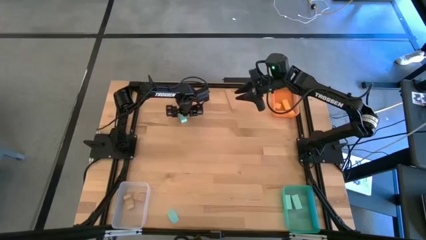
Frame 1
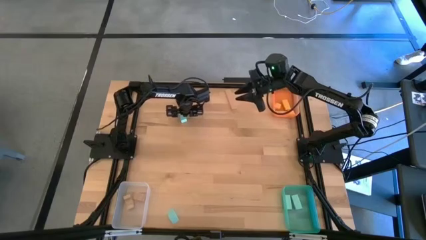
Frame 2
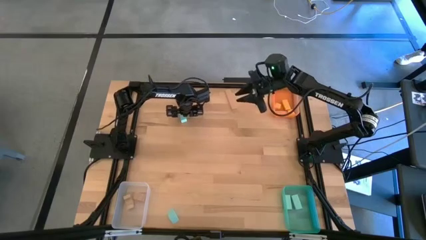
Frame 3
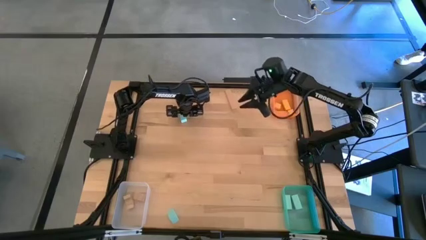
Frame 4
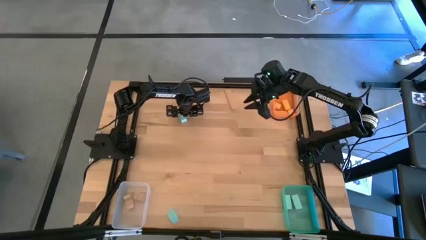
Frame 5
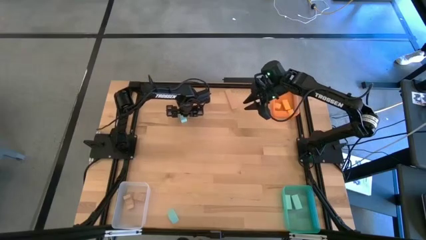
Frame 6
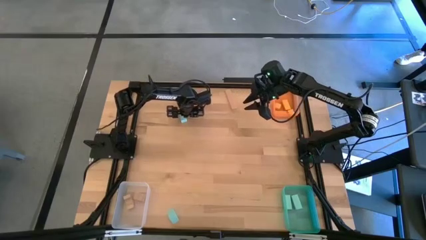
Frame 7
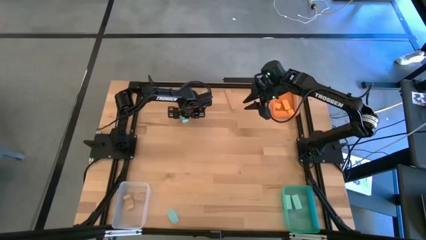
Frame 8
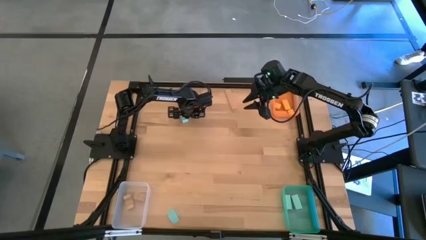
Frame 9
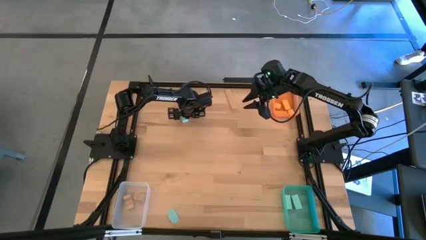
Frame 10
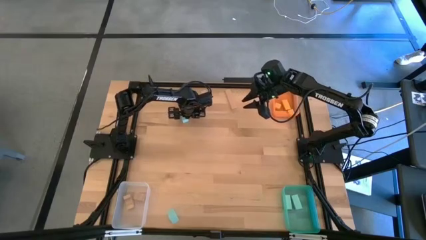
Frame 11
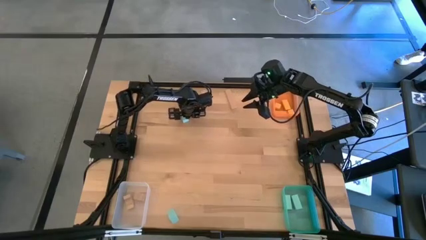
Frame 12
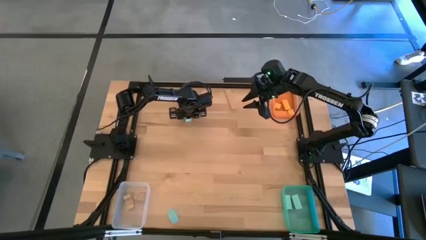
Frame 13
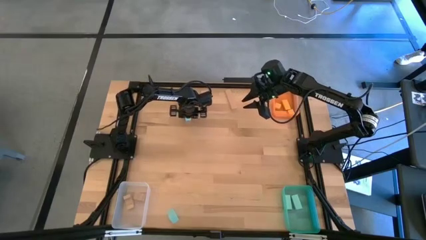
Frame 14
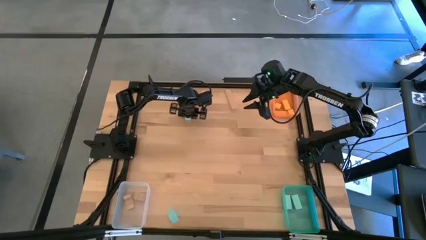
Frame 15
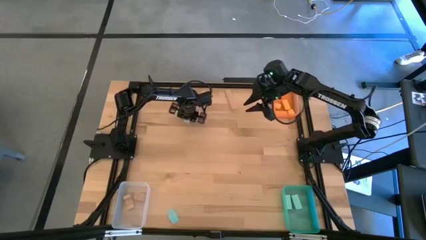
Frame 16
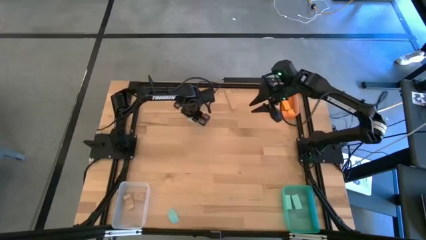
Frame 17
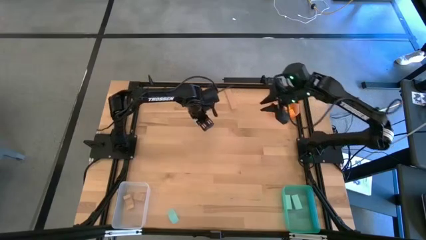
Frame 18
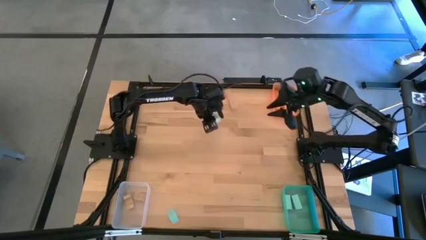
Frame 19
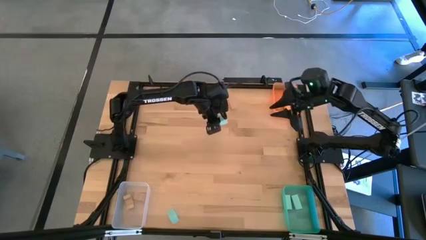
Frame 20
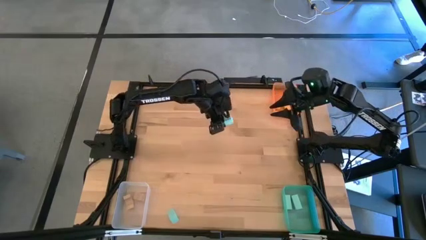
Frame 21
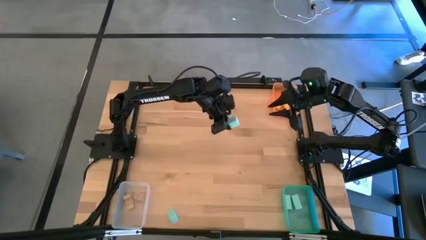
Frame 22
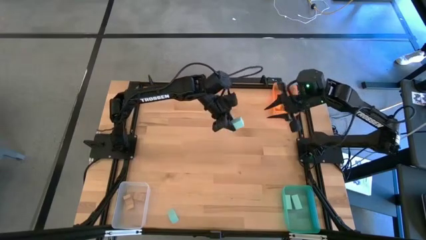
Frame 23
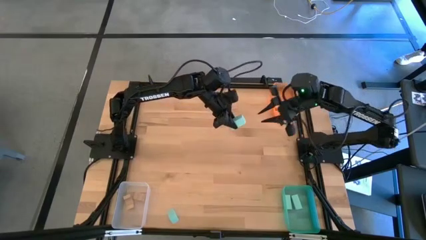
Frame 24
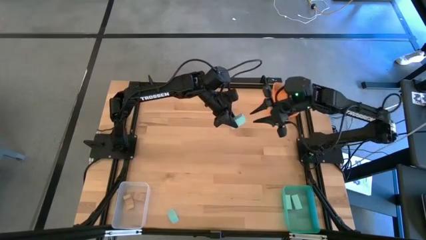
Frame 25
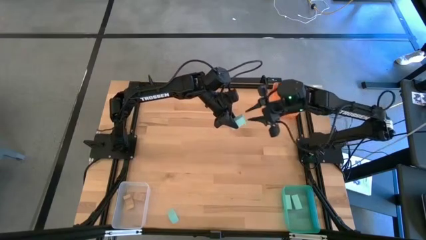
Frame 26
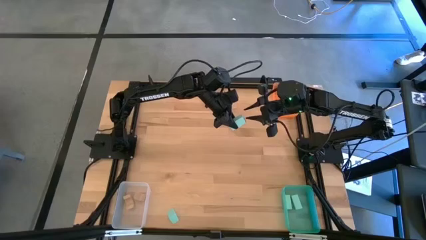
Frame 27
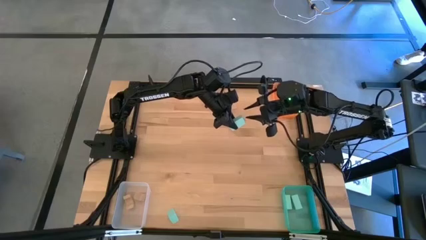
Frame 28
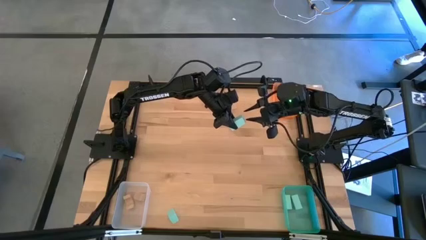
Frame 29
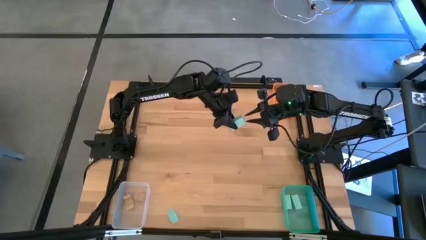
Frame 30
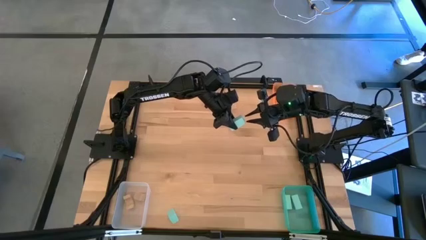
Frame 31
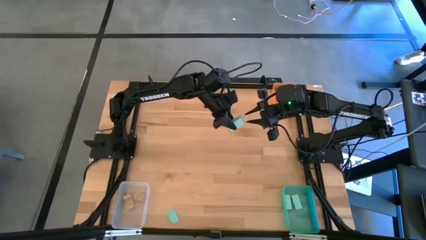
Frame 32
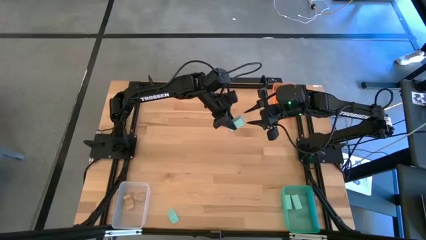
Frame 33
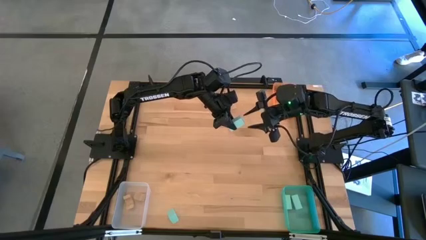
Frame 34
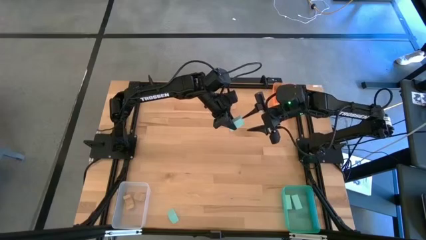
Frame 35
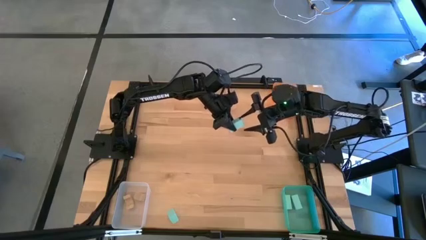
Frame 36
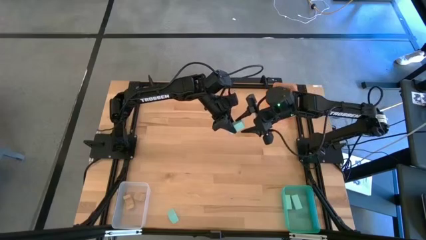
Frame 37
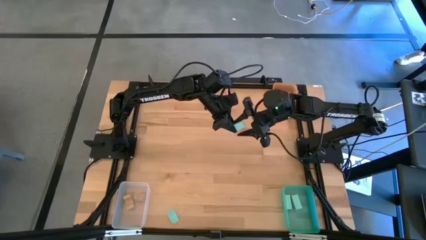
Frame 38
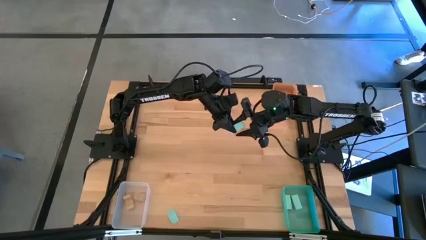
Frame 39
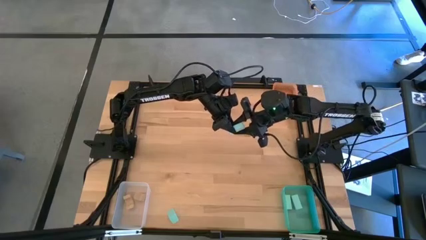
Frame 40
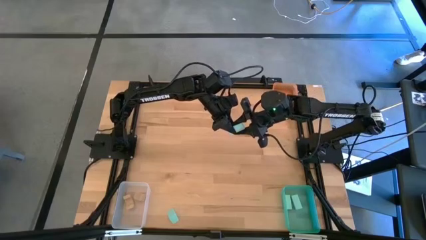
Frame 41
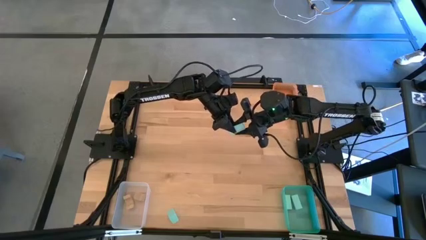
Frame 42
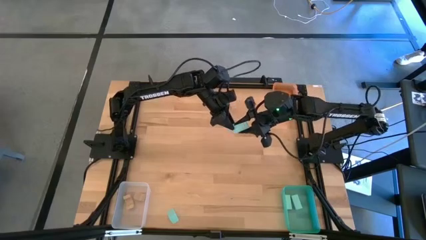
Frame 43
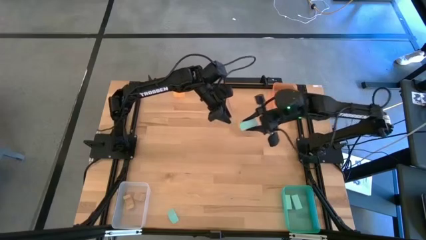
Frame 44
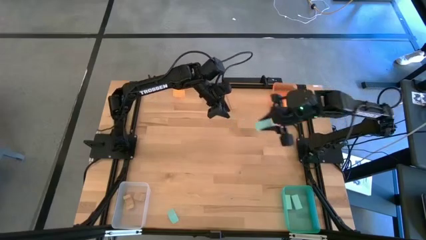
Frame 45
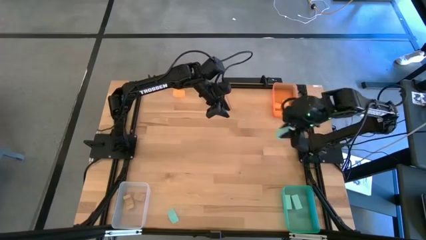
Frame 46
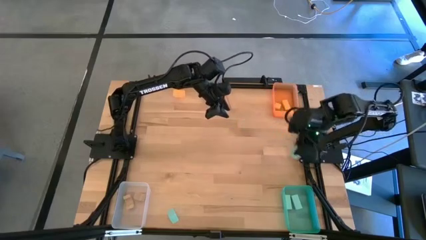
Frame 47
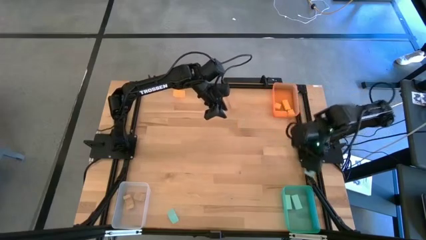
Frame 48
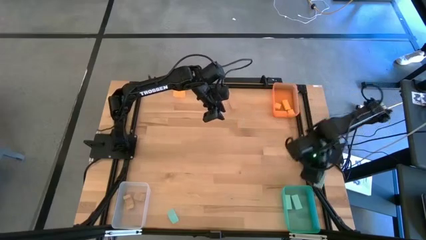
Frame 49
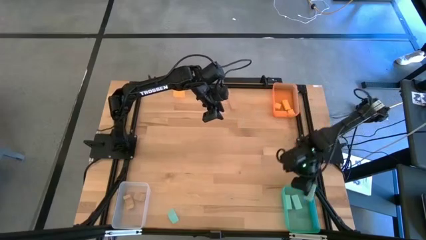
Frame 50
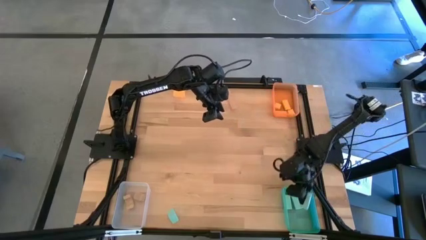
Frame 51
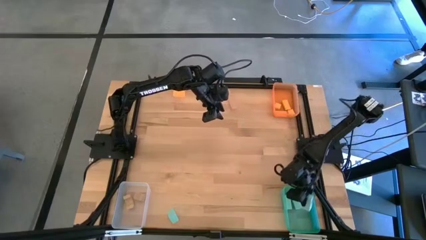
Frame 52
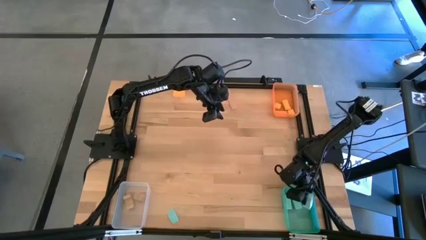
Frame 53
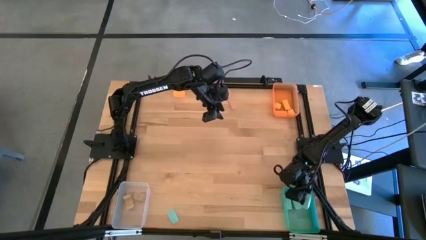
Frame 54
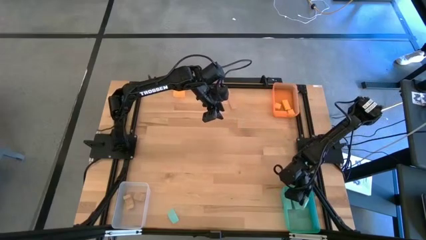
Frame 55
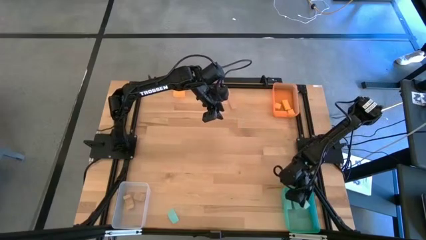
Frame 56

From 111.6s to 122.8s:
Task: Sort & place blocks by color
Put the blue block into the green bin

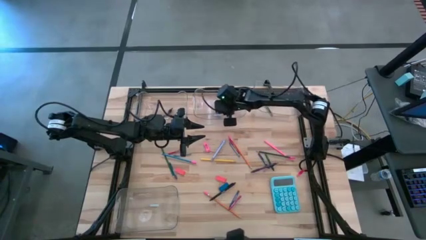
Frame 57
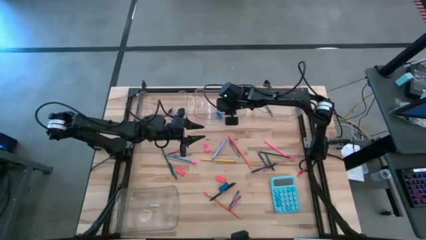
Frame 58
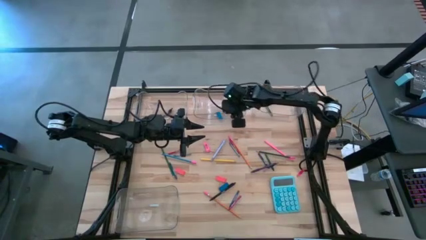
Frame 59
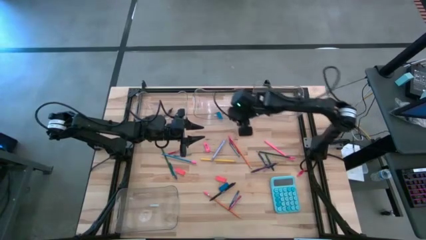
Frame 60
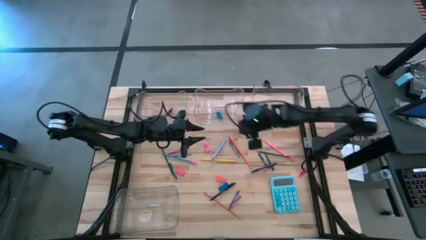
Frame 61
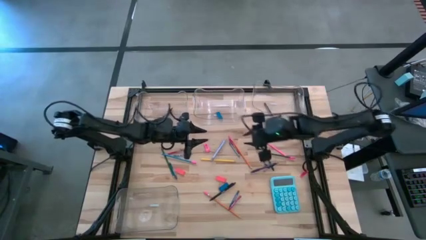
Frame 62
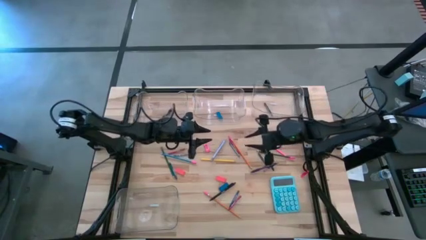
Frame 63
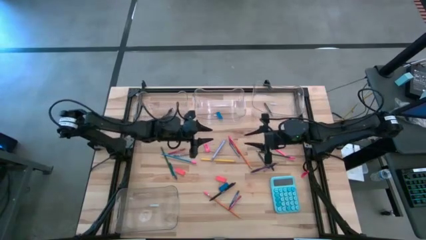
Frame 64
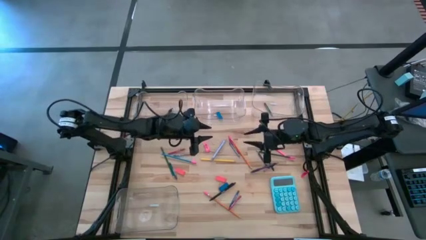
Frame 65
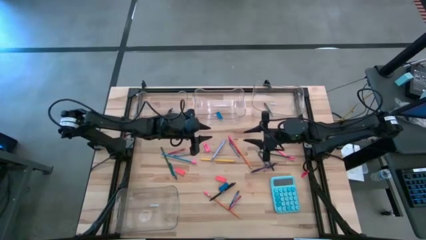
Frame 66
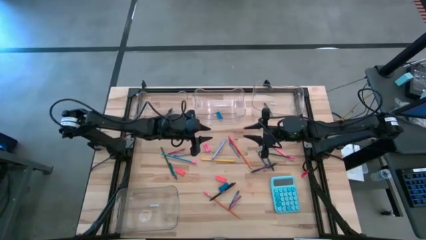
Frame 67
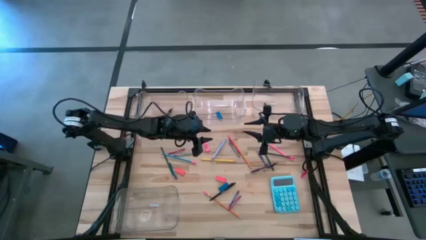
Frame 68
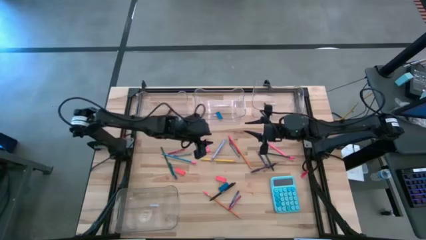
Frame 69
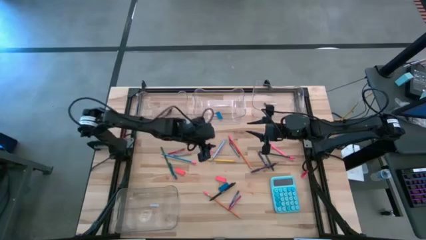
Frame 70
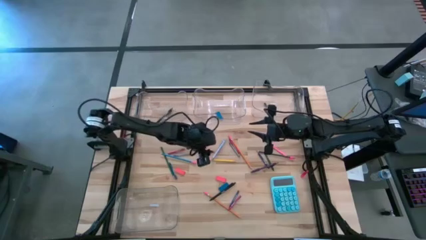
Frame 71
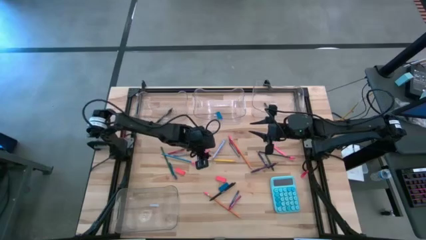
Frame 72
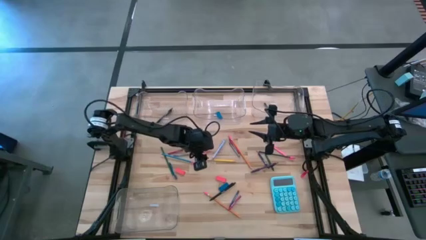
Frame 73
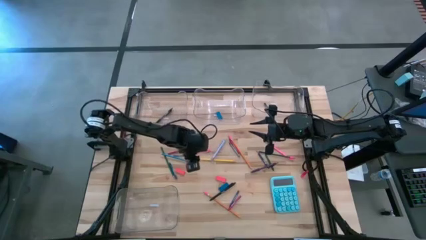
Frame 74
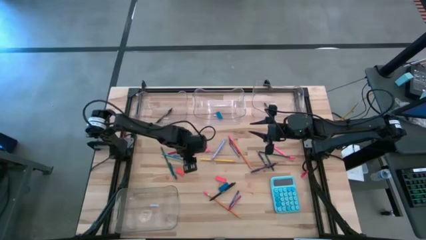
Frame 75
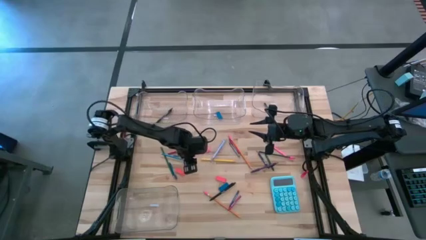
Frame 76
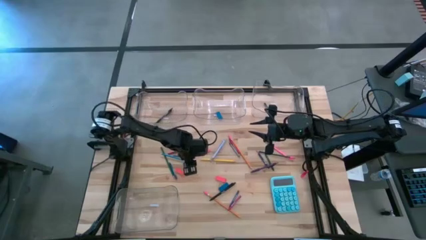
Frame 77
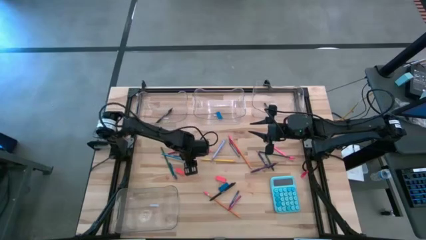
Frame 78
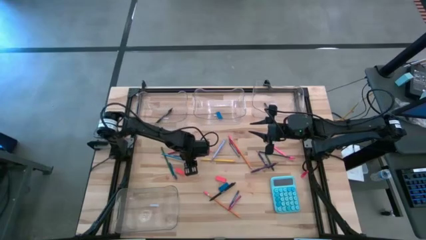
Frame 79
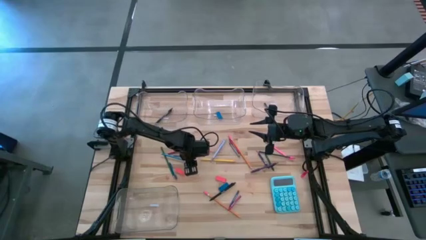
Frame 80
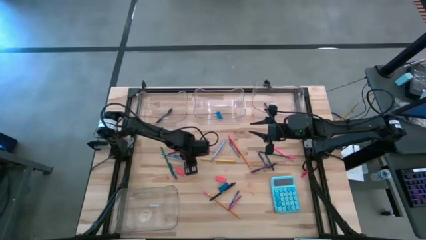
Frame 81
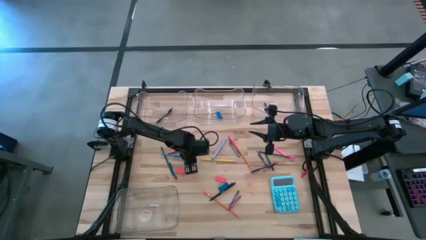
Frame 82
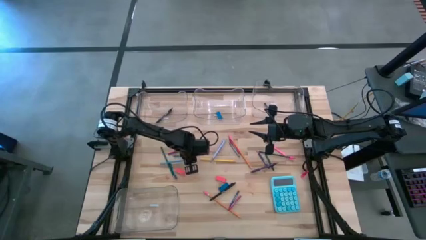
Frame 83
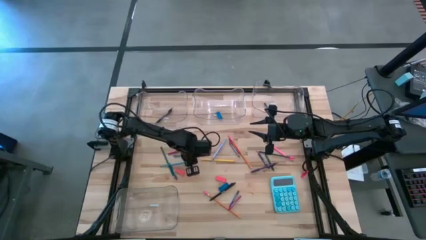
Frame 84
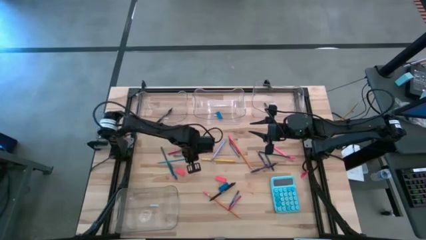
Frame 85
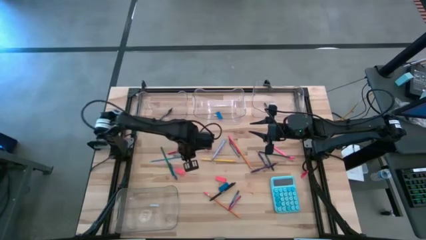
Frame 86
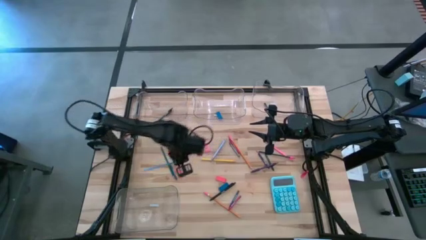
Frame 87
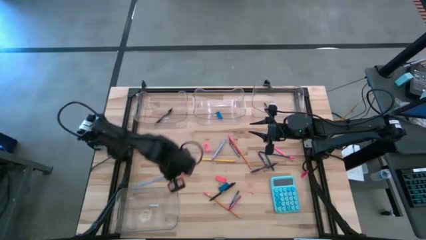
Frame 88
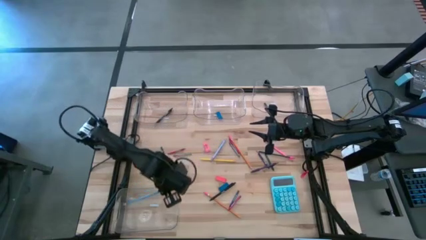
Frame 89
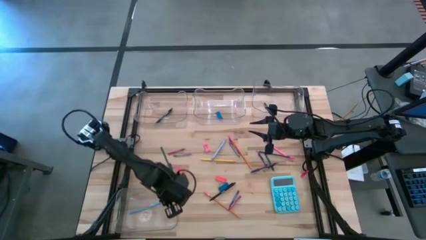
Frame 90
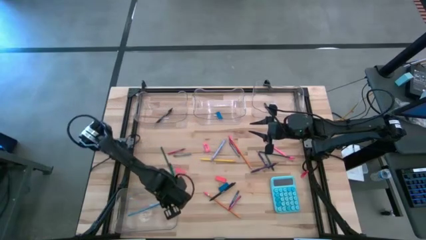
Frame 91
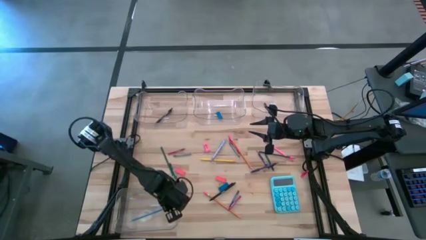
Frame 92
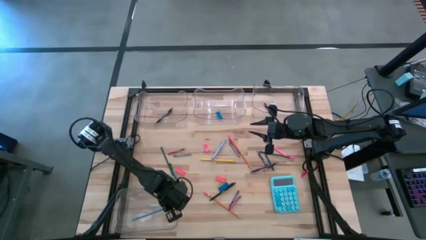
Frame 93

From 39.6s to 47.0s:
Task: Sort crayons/erasers/pens/pencils in bins
Put the blue pencil into the bottom transparent bin
